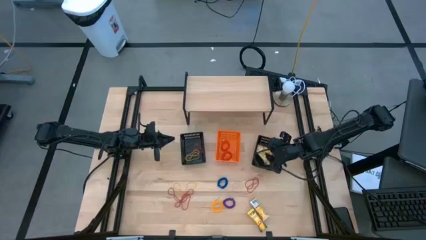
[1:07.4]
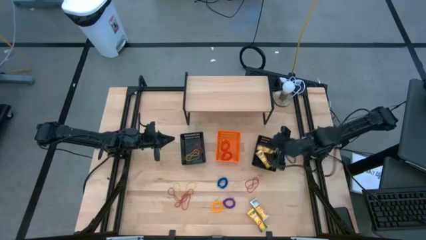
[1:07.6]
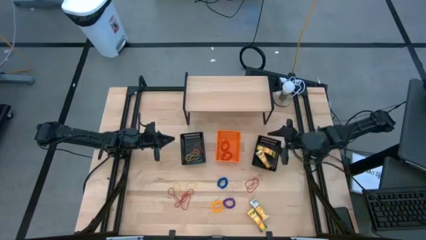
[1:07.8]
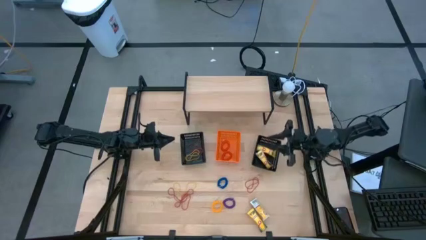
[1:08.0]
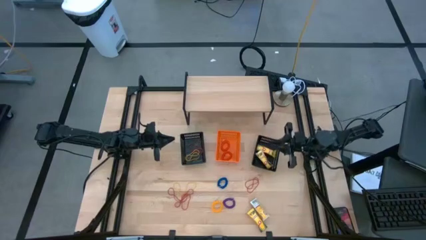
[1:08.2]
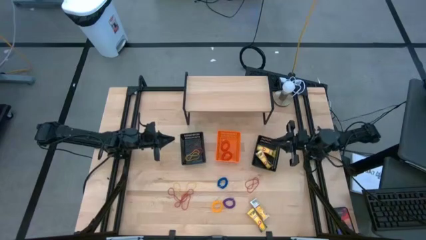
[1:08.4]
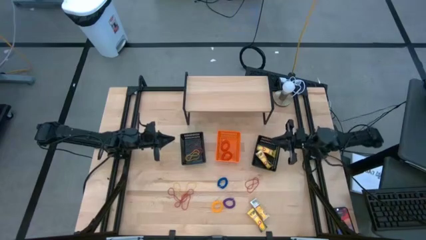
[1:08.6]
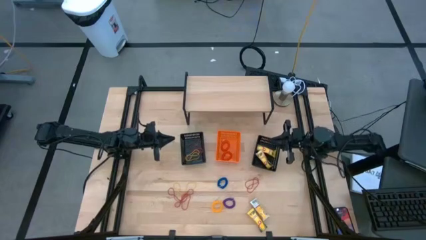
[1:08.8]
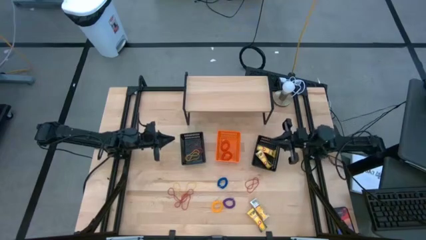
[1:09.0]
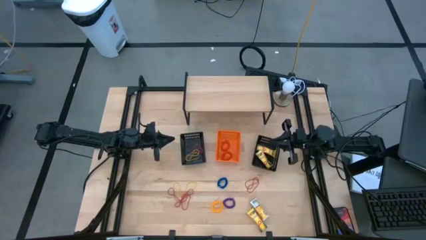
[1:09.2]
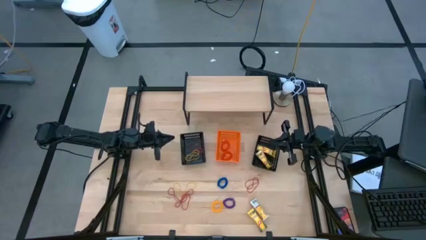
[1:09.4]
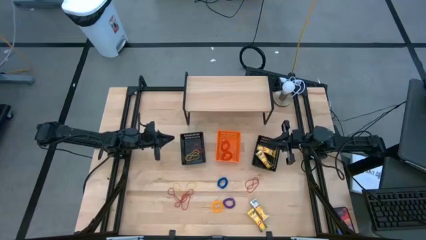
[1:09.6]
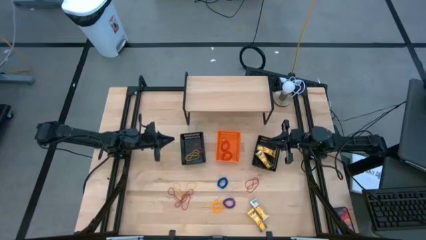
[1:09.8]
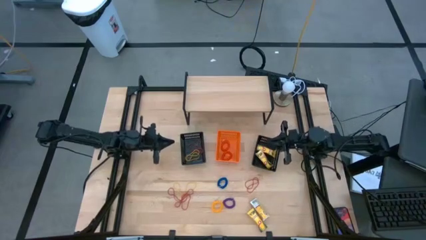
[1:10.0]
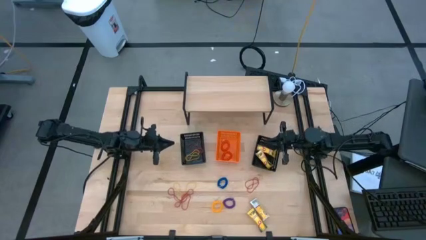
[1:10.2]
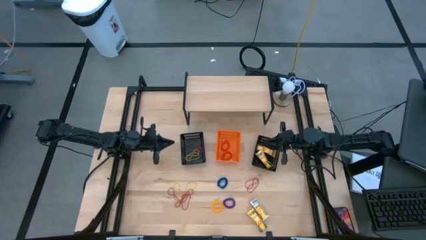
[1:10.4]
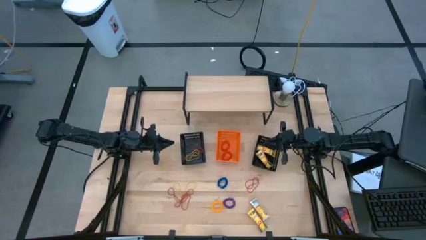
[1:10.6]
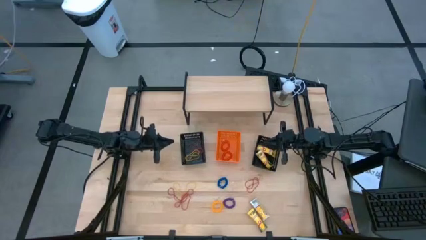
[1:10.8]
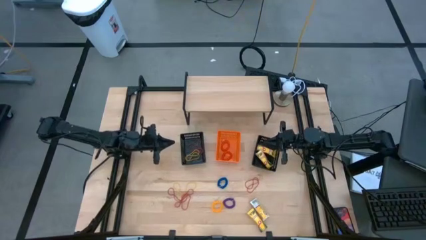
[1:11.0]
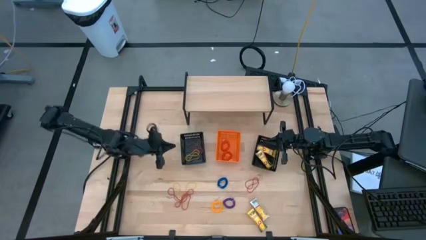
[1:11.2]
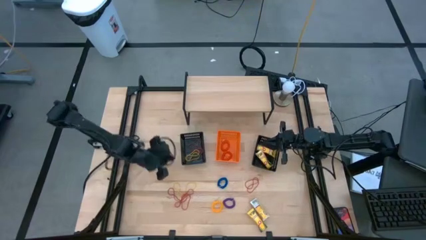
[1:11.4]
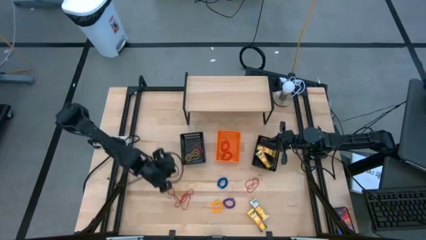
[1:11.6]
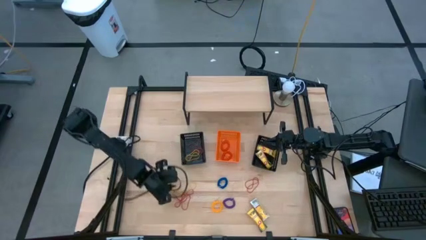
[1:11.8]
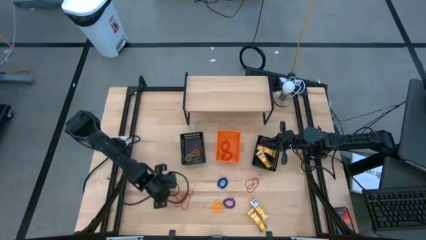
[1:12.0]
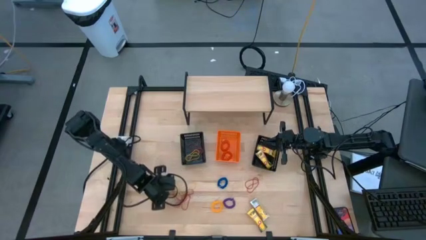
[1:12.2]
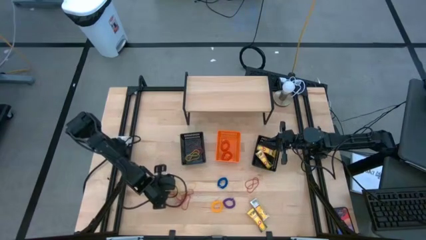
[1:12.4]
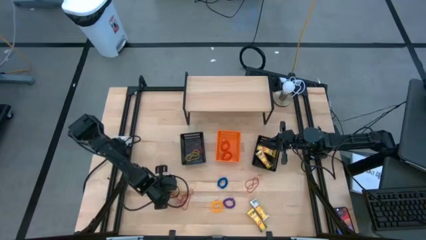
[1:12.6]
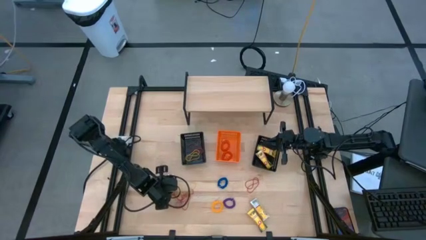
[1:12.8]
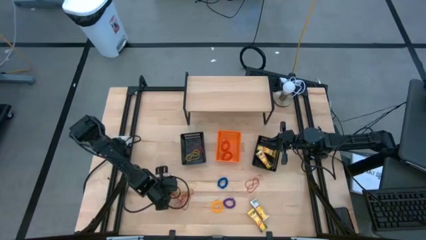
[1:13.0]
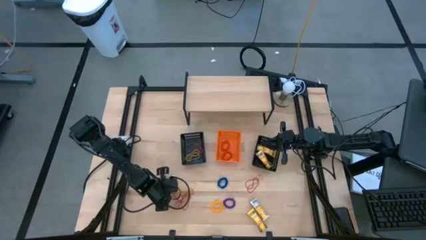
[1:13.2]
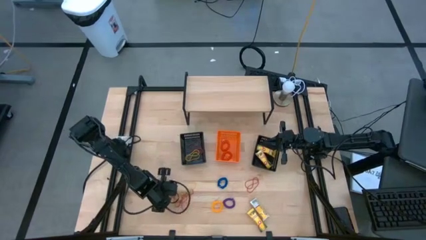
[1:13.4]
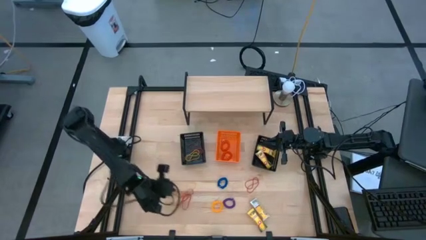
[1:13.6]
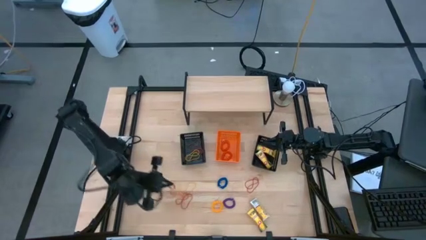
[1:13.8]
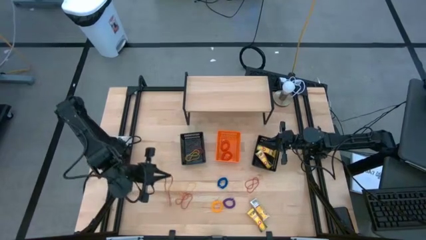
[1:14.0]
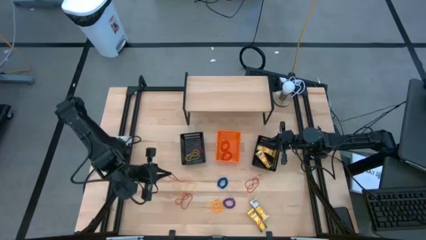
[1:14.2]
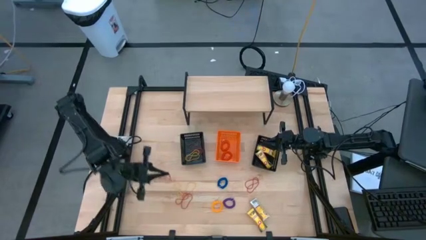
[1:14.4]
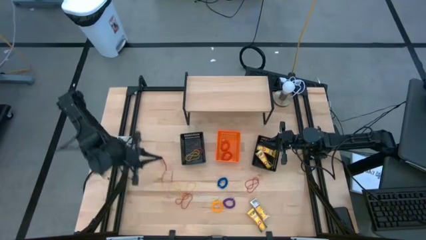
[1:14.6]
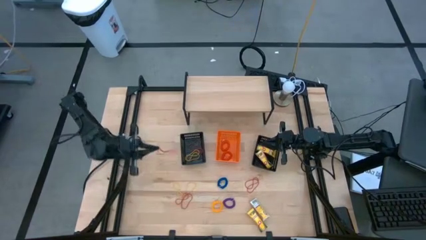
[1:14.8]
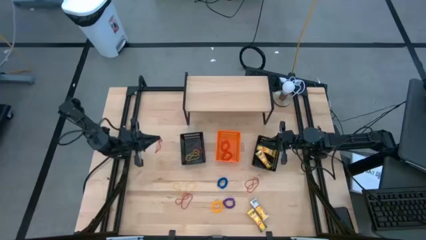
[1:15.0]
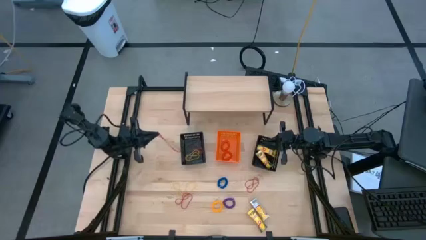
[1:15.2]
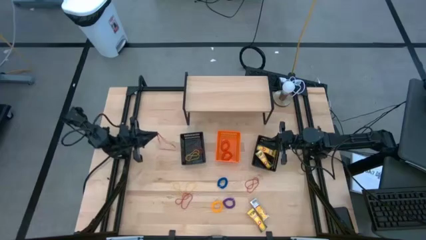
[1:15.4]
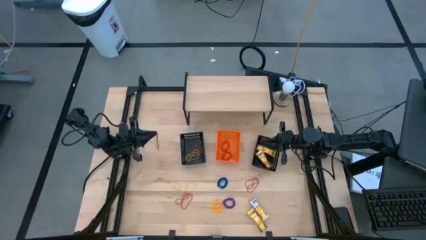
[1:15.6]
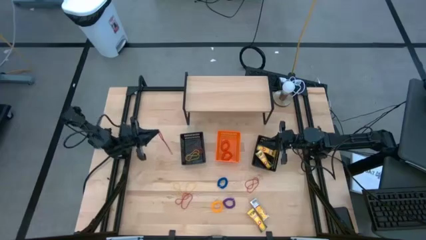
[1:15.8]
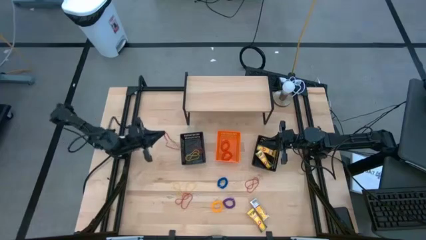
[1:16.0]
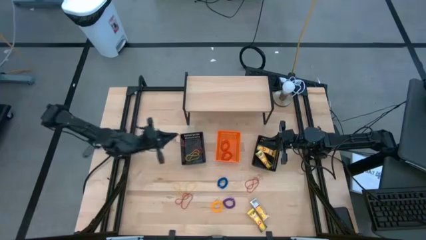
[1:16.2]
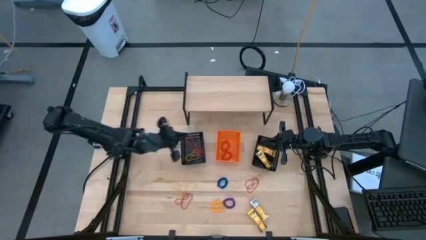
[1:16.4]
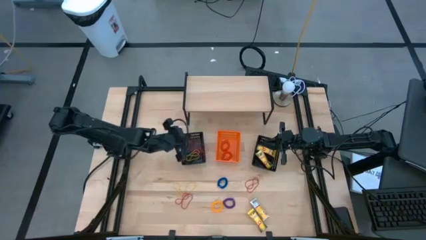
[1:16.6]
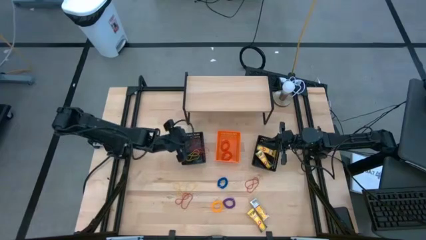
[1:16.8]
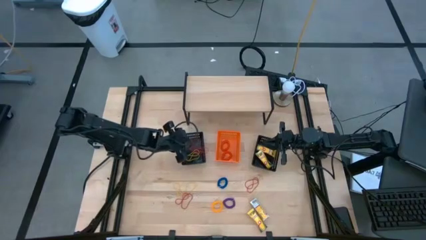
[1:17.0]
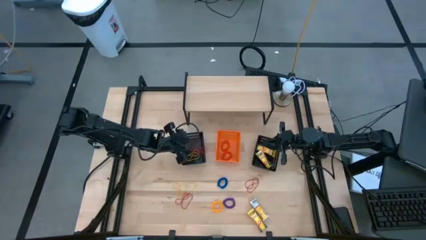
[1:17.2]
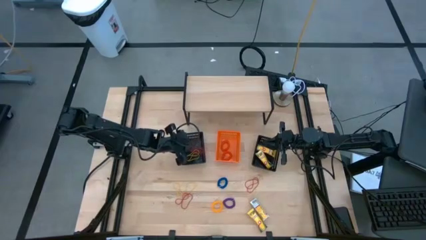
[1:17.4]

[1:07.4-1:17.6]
Task: Pick & Place Office Desk Supplies
Put the red rubber band into the left black bin

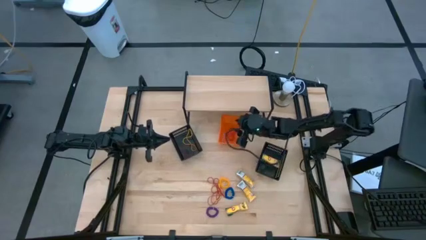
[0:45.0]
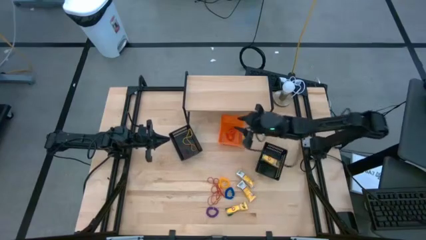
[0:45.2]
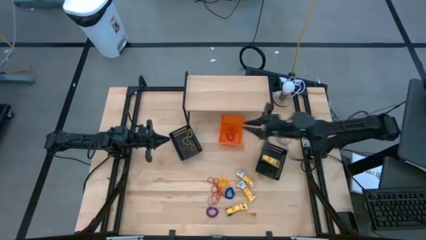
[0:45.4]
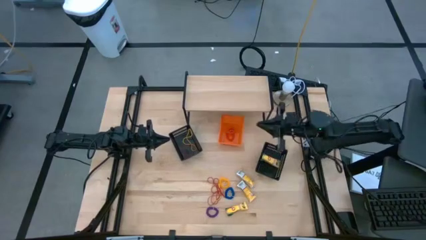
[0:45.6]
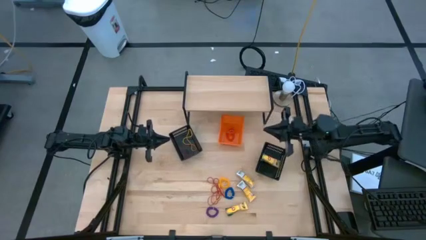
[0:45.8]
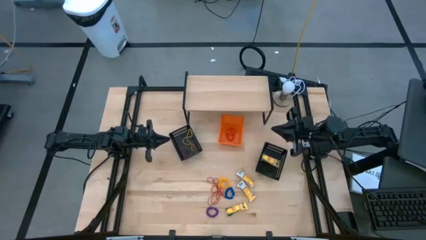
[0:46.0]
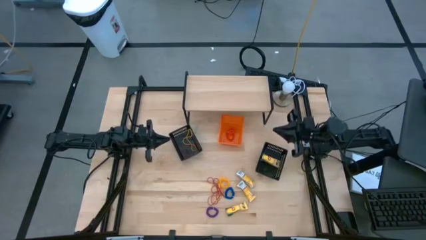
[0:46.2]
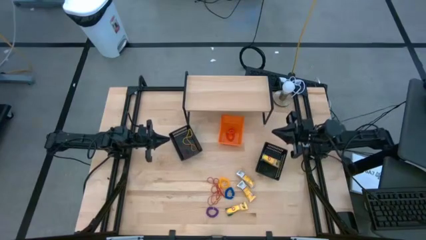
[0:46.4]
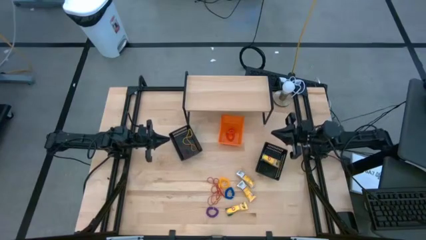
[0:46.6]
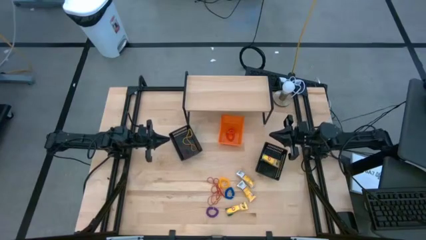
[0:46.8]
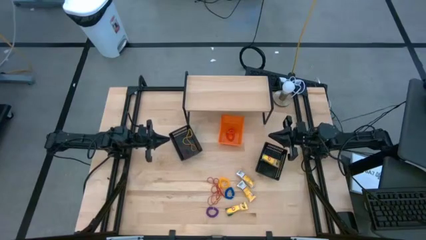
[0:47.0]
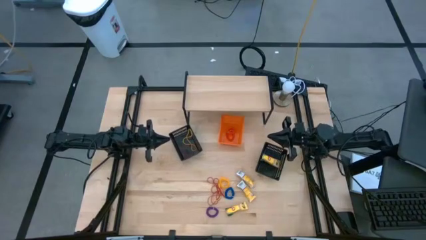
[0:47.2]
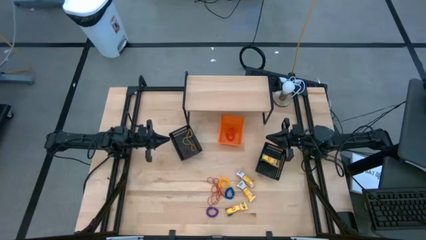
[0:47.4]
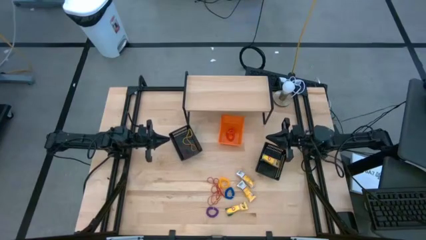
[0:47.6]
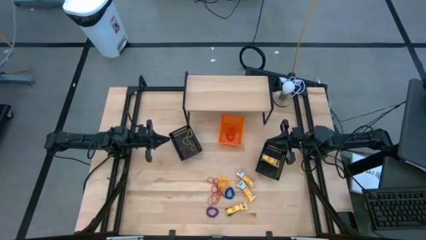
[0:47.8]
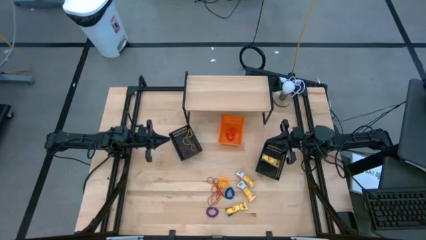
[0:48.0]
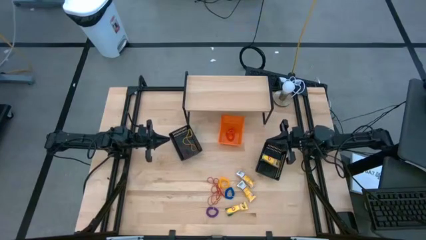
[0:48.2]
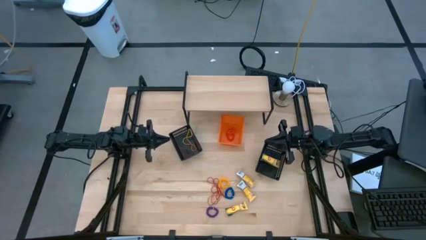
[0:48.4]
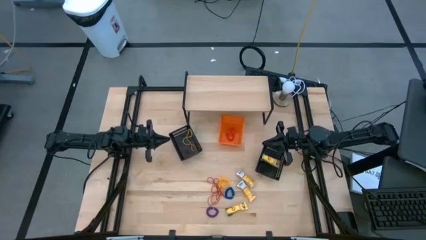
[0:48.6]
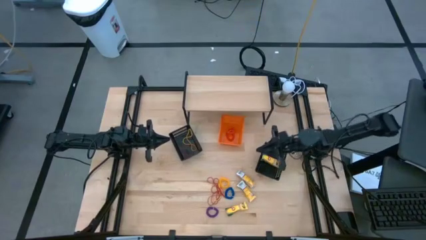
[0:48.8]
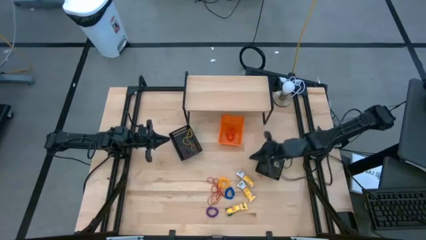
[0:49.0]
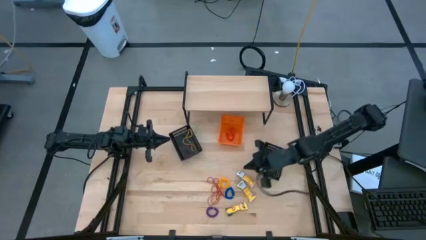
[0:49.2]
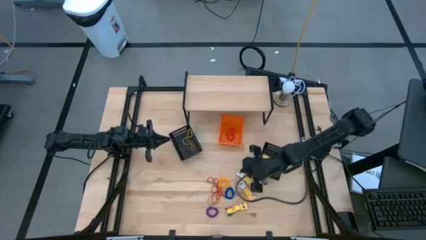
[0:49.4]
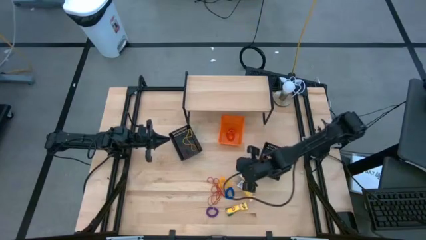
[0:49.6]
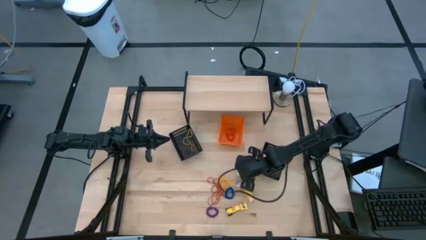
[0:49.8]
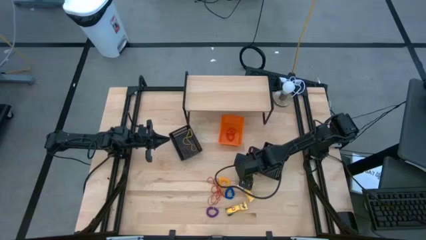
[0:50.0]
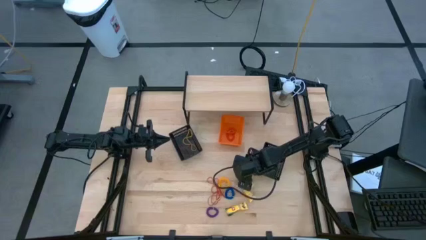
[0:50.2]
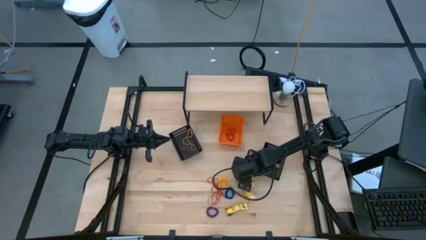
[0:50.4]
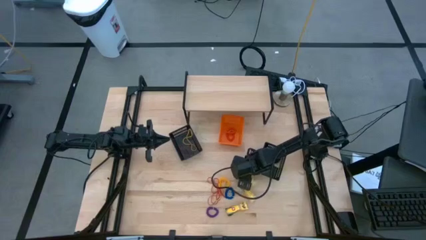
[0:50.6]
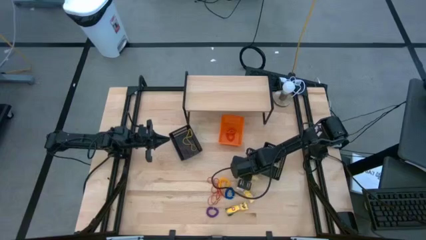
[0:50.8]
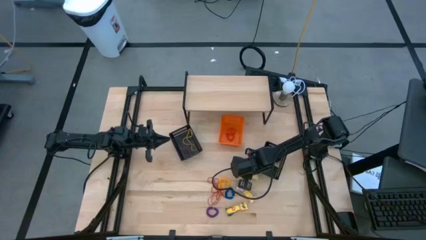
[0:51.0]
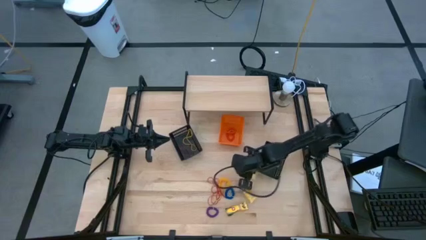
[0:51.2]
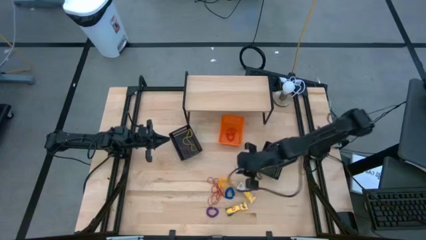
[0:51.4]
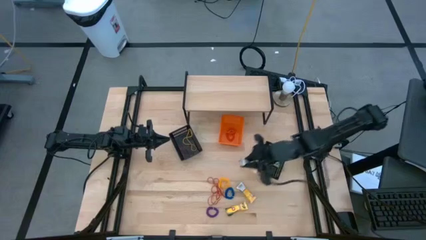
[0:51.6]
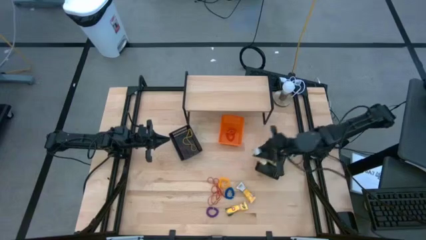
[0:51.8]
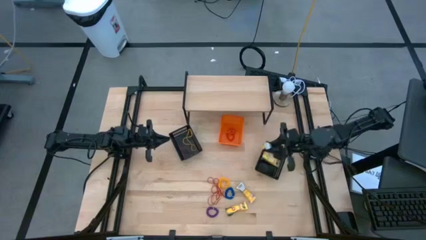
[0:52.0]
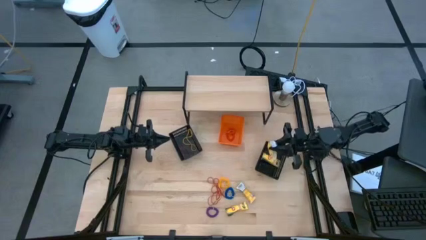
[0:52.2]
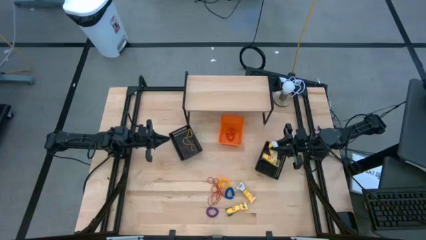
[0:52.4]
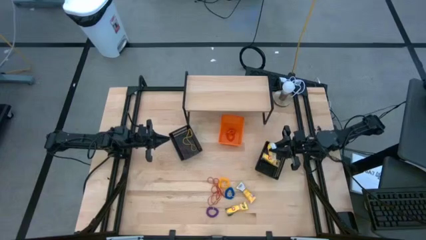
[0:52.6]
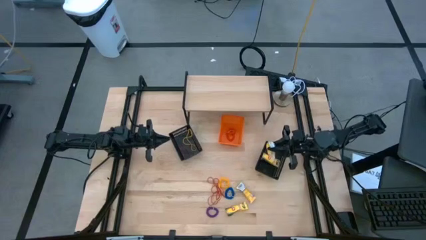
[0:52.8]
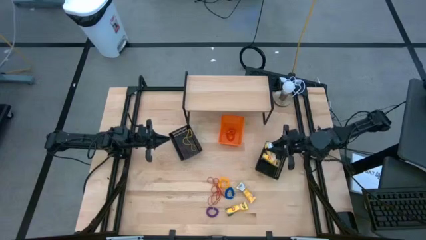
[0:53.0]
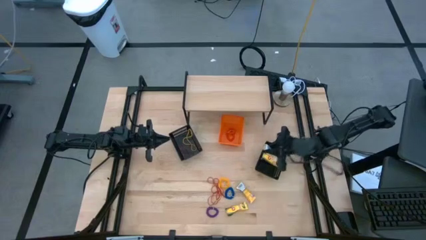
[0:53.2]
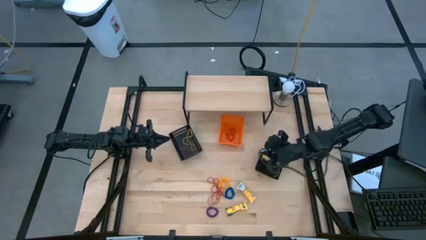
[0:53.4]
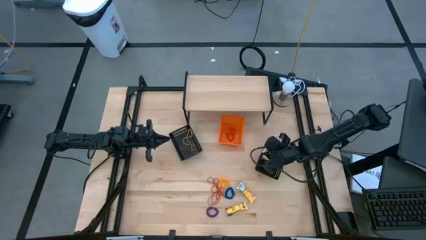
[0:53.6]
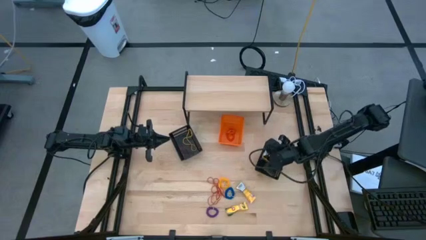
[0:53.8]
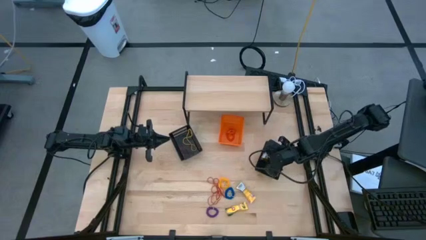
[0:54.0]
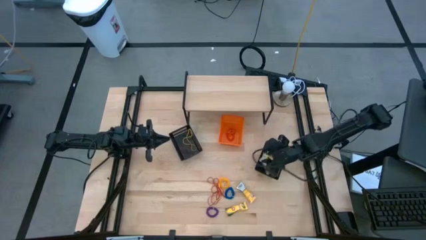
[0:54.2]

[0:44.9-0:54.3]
Task: Pick & Place Office Desk Supplies
Put the crayon box into the right black bin
